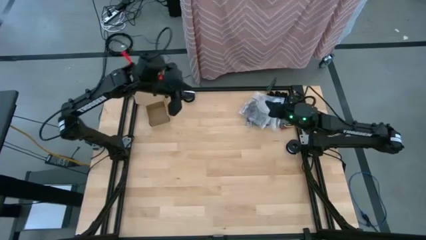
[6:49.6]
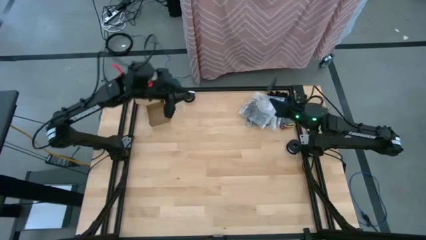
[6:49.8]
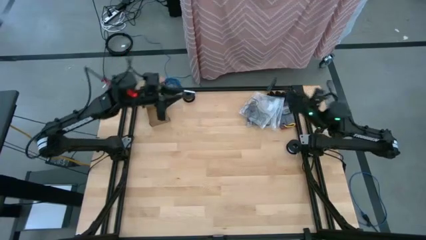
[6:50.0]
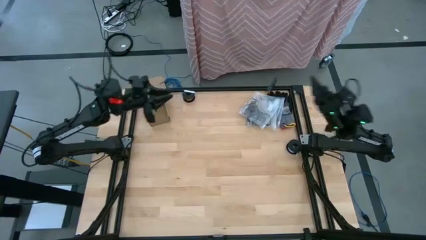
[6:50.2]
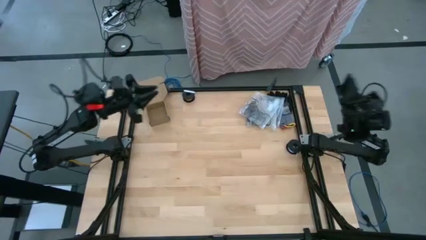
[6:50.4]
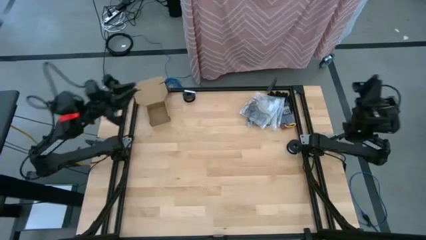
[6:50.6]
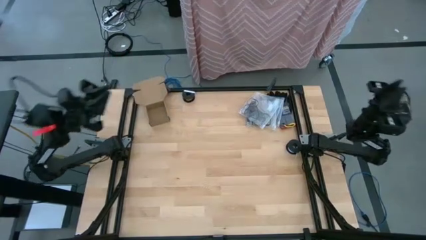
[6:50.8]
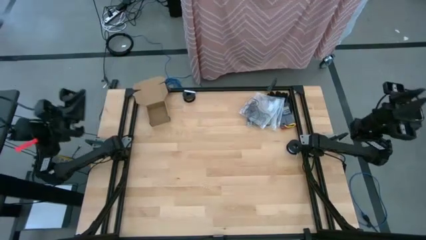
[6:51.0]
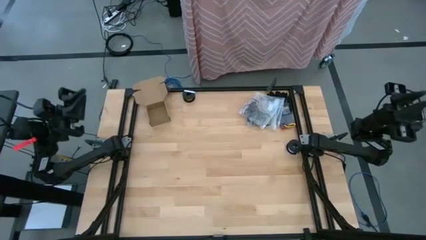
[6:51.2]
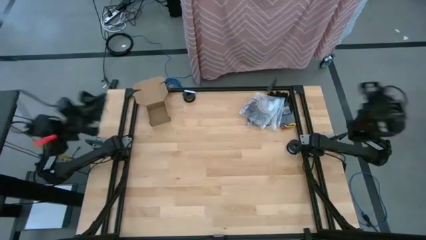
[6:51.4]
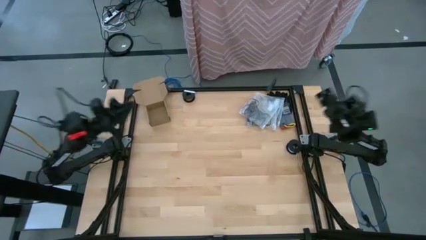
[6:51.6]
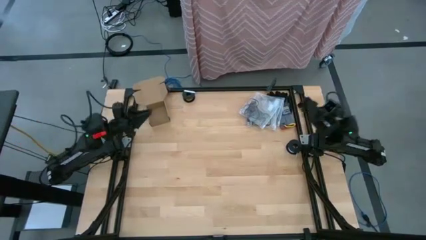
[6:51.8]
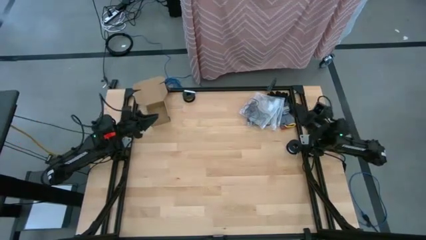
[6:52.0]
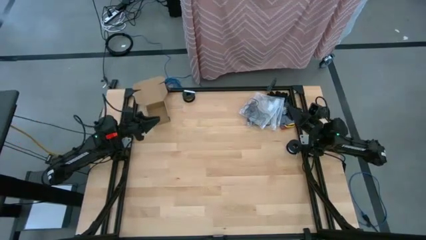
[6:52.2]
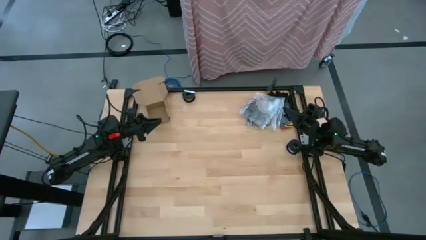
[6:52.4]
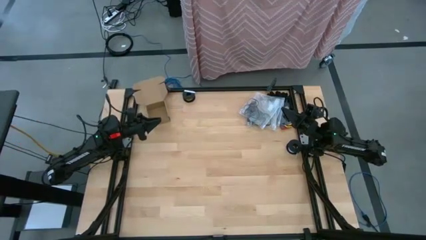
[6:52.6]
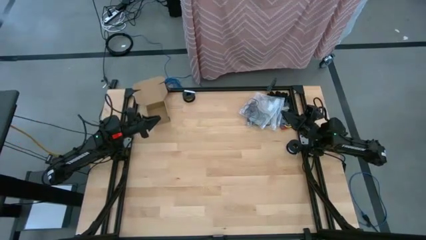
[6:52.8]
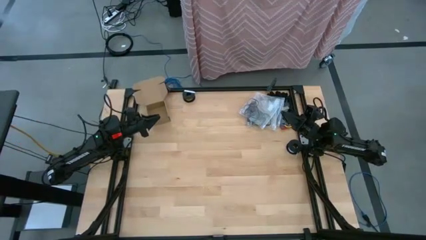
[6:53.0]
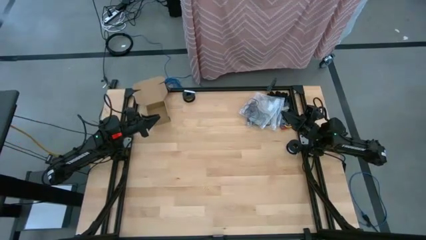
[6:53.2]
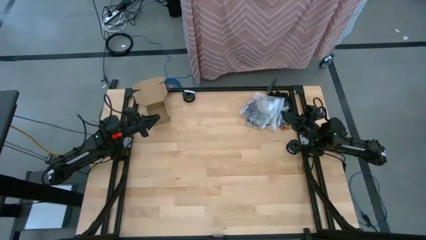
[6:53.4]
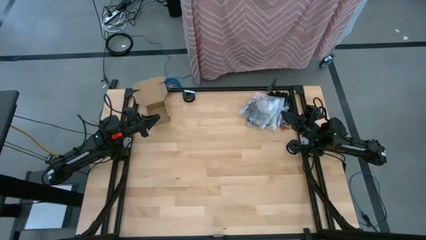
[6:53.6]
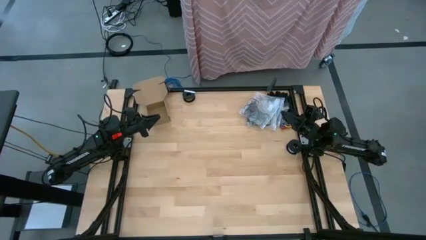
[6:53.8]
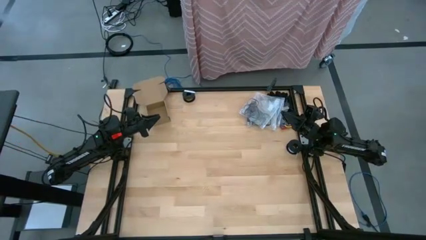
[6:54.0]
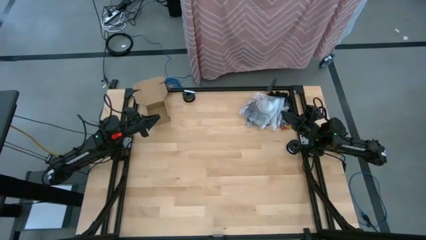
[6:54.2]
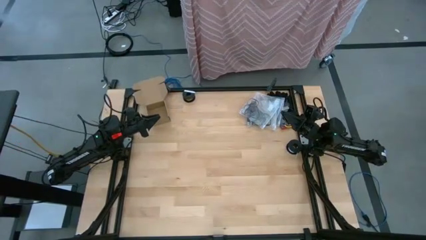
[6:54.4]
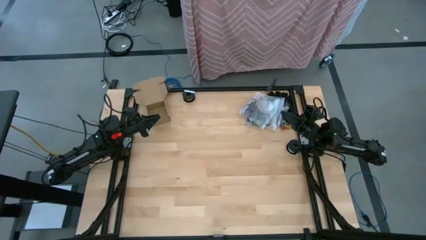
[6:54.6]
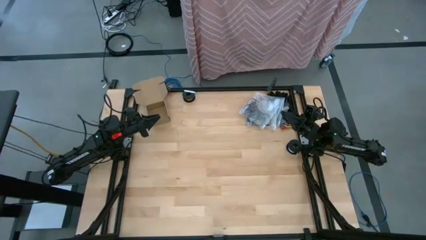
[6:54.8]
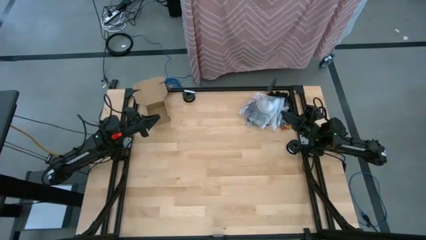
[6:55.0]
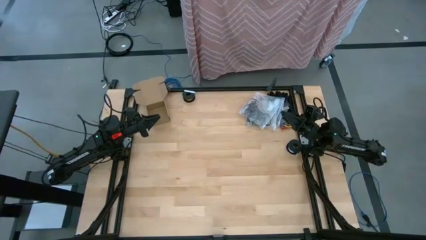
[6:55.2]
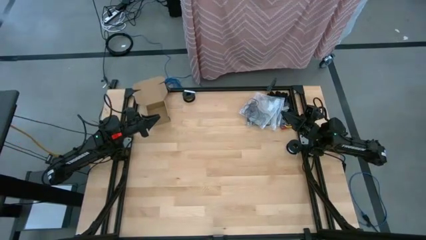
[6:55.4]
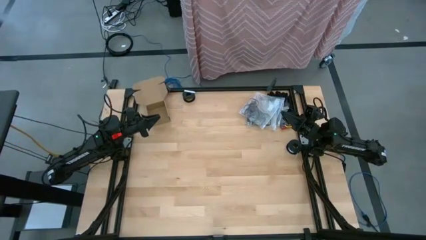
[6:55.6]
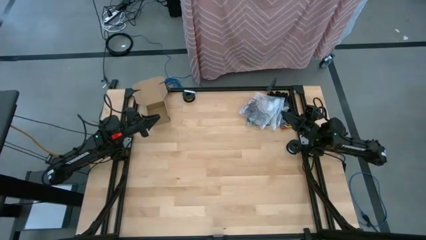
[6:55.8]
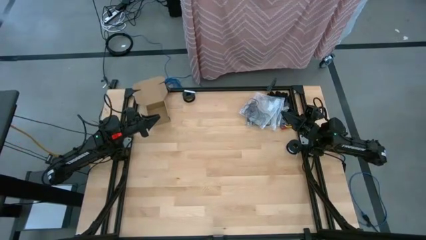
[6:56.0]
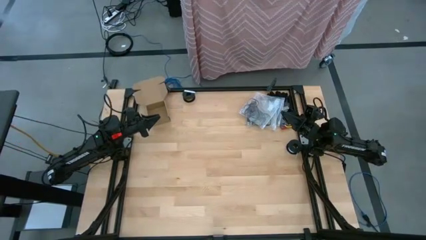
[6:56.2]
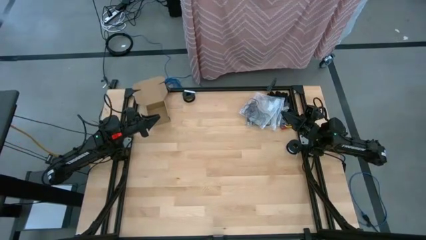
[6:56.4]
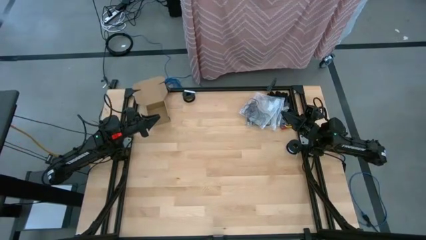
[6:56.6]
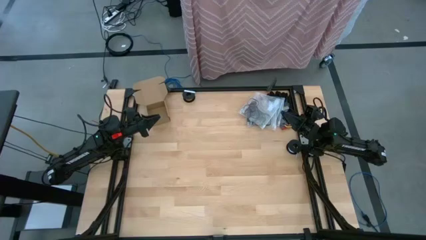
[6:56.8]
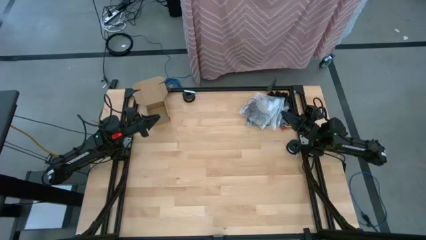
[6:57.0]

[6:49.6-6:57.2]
Task: Sort rubber bands
Return to Home Position

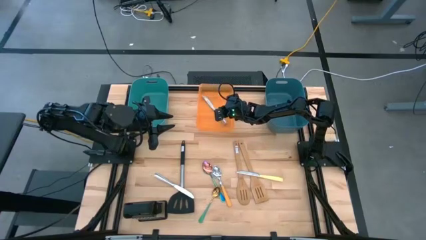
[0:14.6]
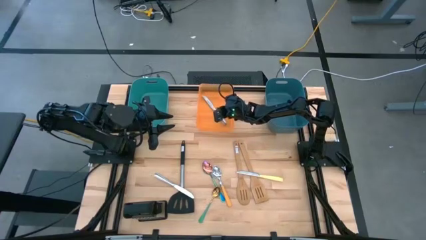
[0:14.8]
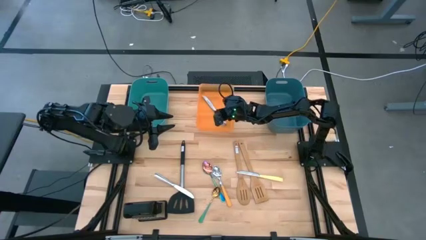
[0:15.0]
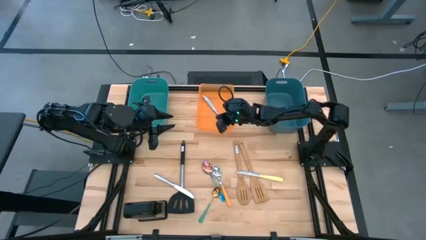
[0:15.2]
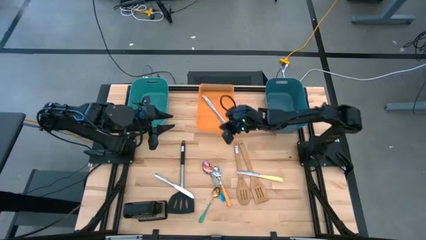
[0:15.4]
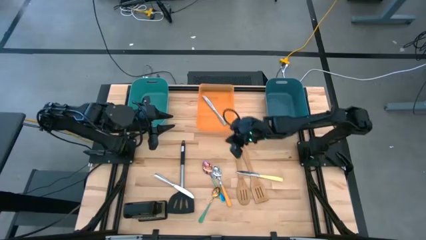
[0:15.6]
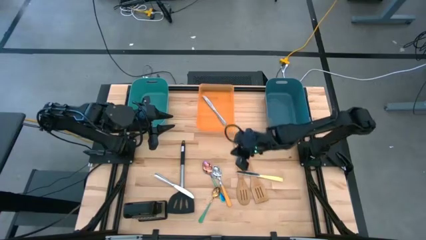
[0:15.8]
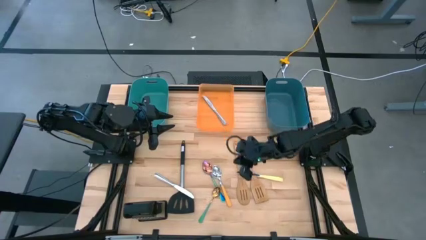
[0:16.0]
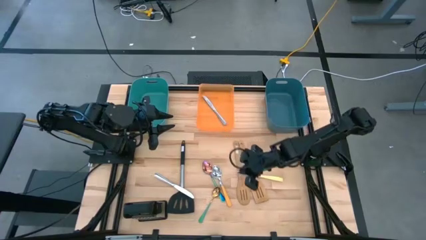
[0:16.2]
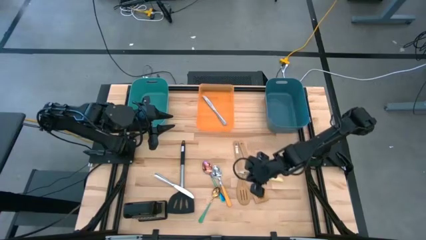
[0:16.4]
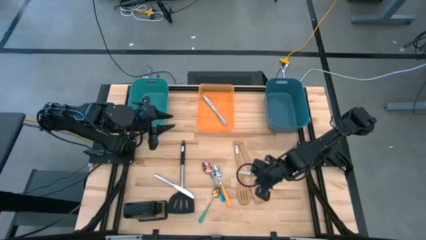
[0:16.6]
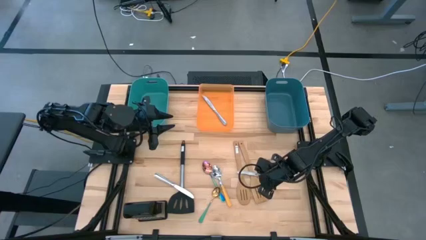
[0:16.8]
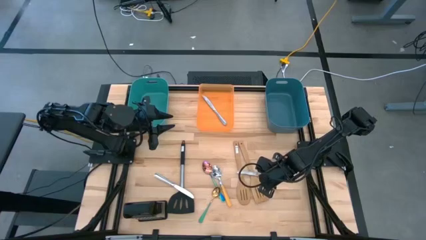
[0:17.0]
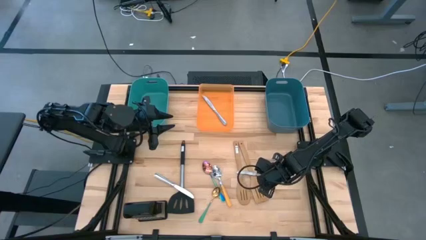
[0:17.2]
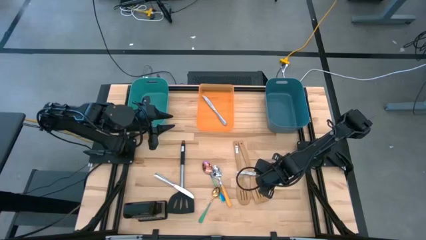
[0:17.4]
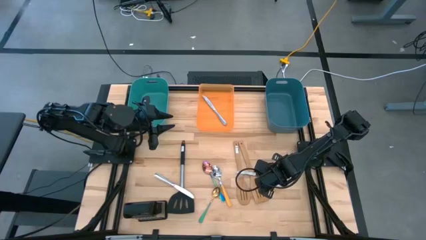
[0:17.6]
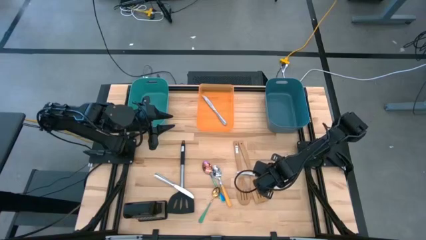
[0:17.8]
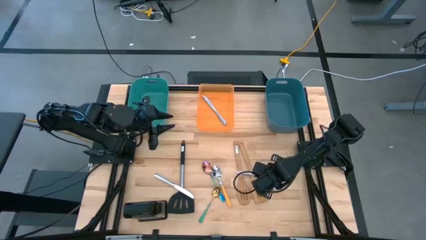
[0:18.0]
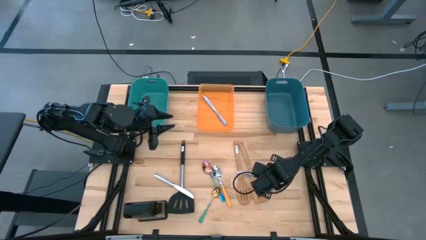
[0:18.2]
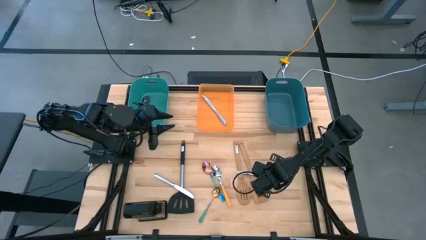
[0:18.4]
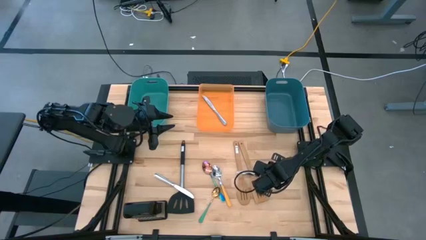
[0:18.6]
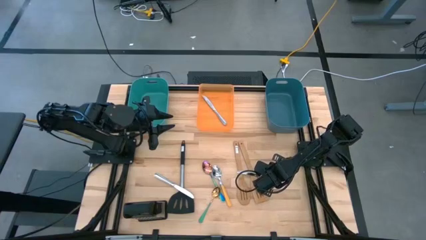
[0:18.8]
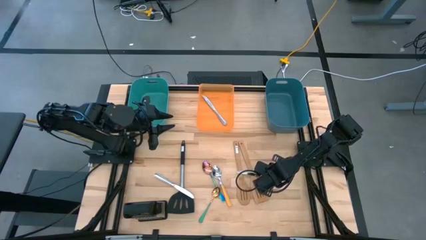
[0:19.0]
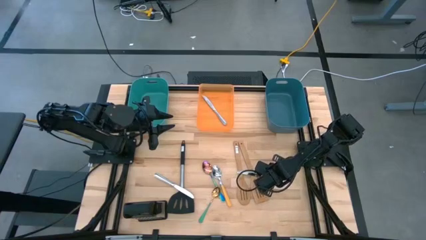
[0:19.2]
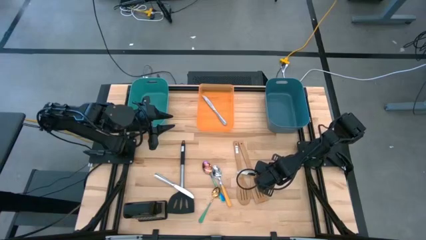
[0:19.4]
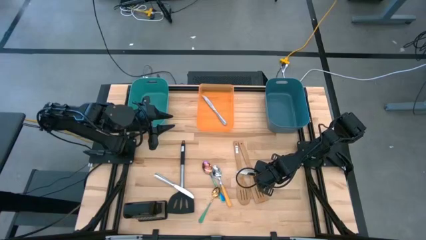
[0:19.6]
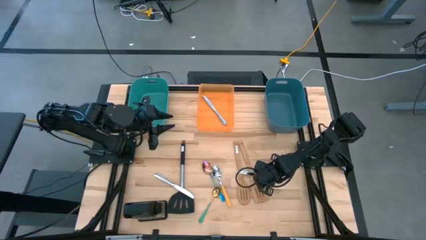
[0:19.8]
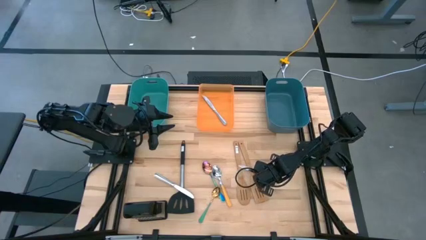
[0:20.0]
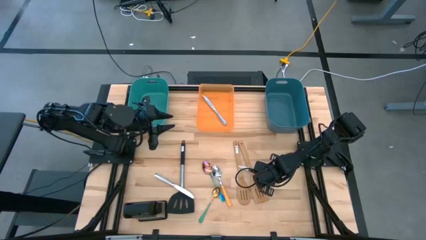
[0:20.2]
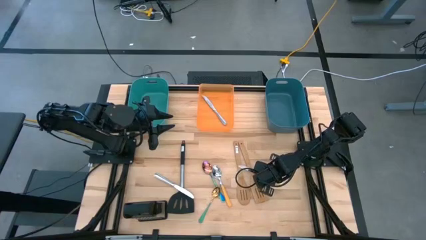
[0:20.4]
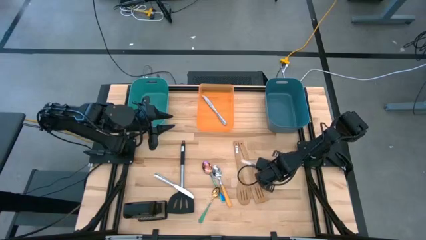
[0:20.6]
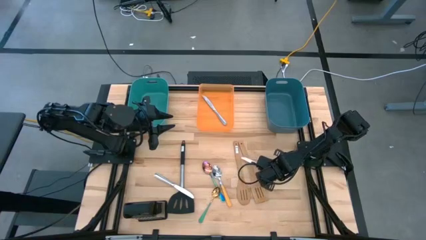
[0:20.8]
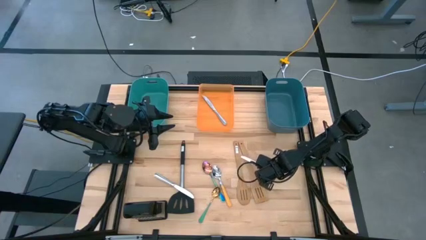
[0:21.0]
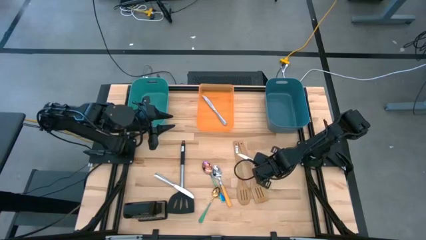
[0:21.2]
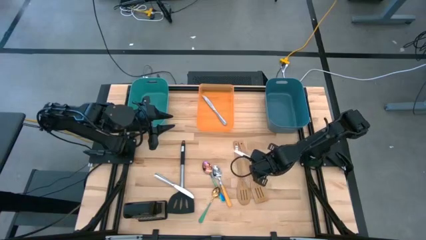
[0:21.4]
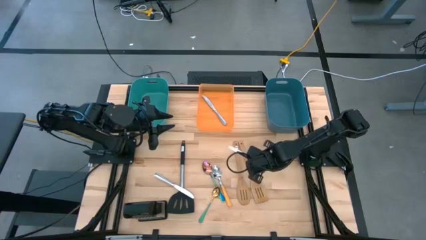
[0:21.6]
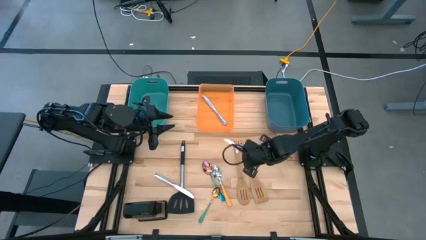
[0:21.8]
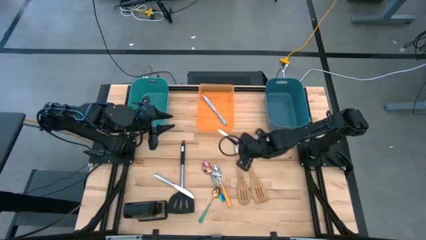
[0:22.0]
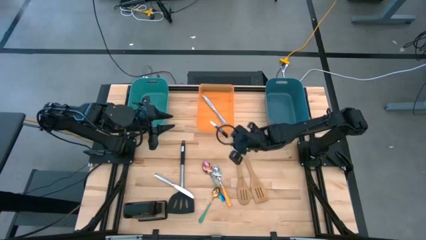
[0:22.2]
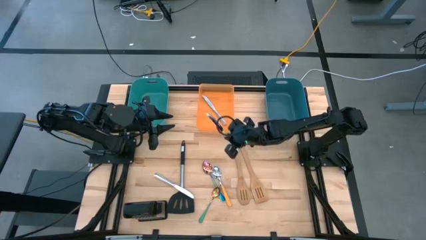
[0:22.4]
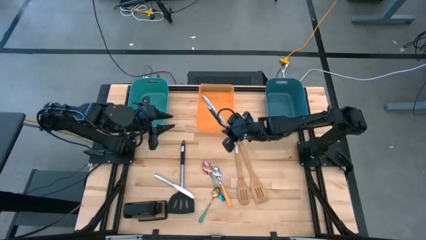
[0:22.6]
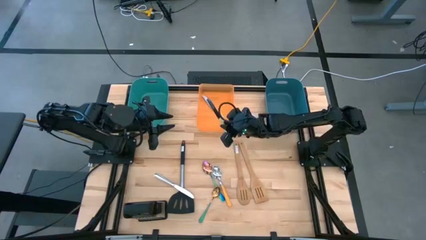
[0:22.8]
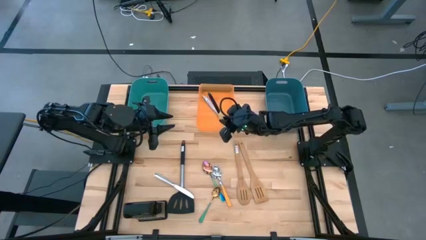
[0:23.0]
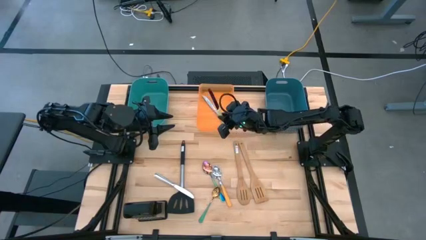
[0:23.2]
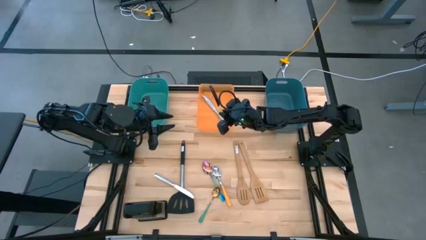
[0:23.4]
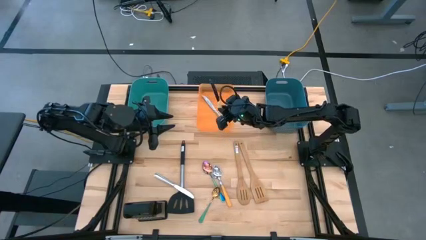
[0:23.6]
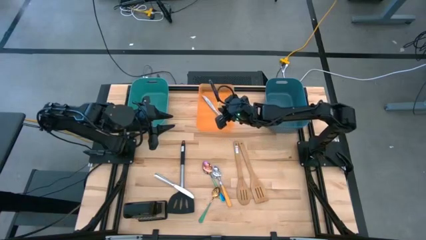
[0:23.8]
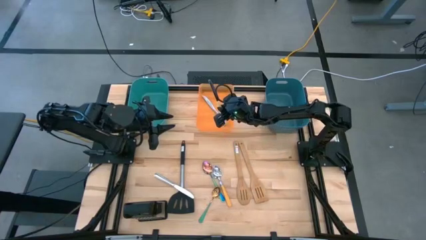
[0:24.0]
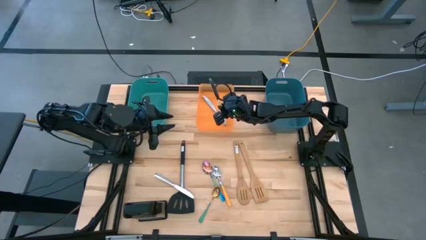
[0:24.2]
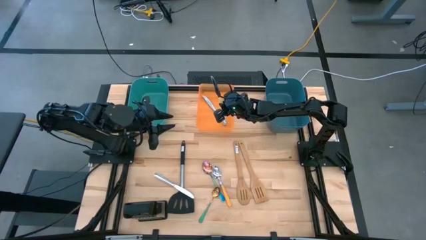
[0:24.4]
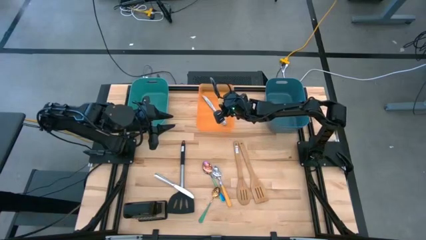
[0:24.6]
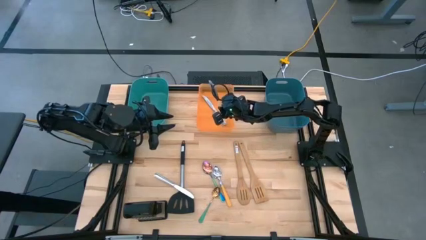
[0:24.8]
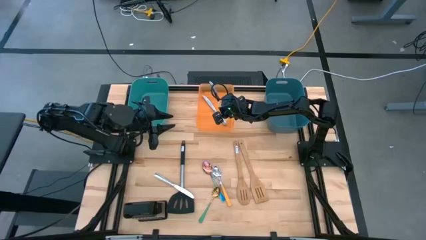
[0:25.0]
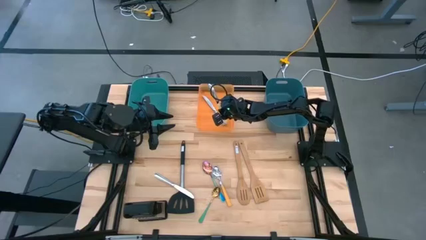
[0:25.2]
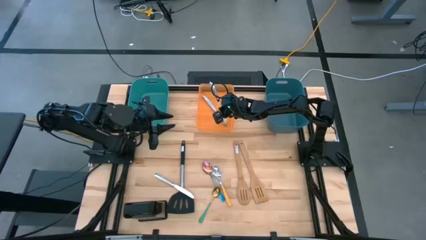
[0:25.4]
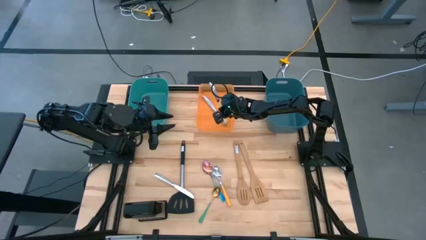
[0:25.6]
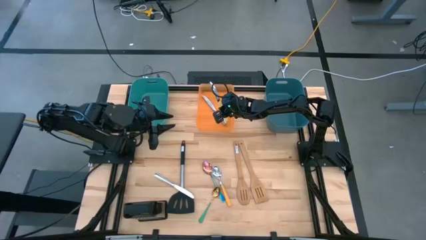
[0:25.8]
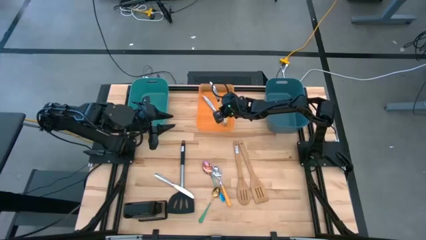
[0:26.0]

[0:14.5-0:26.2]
Task: Pick & Place Kitchen Items
Put the yellow knife into the orange bin
